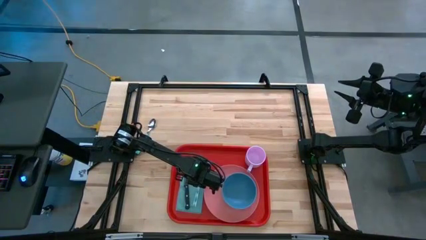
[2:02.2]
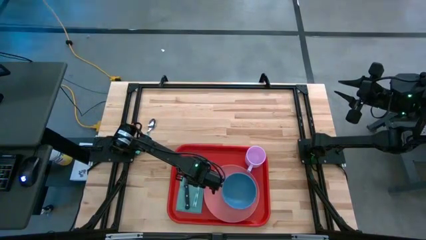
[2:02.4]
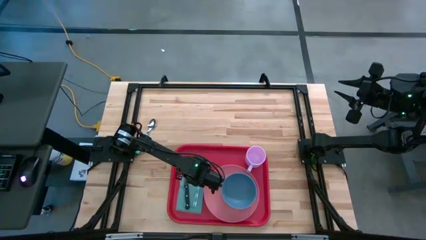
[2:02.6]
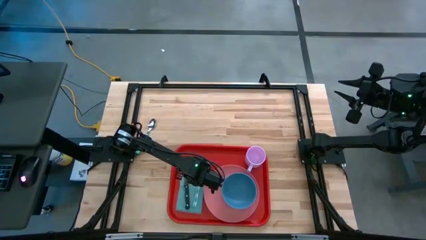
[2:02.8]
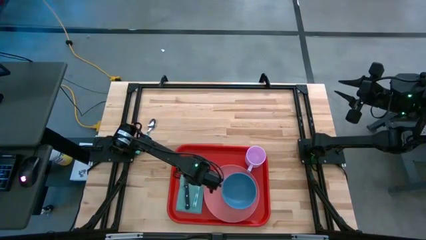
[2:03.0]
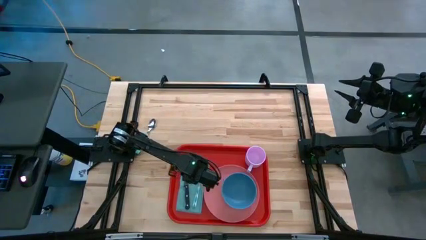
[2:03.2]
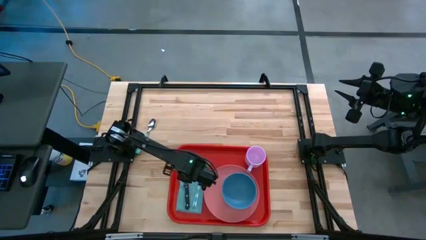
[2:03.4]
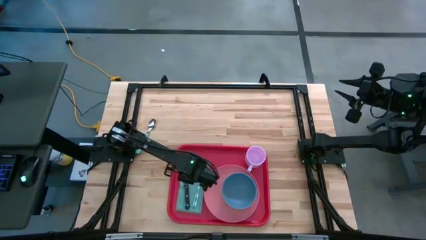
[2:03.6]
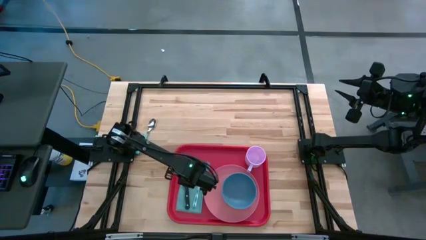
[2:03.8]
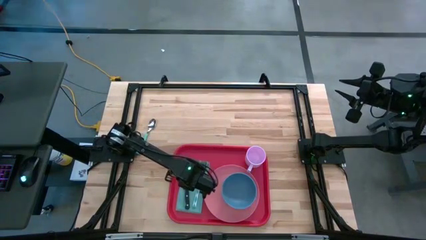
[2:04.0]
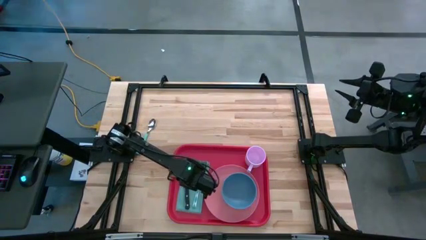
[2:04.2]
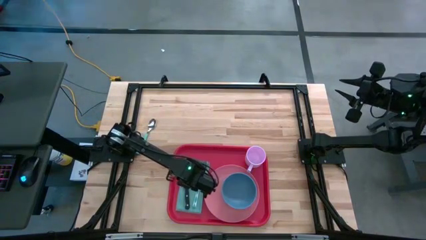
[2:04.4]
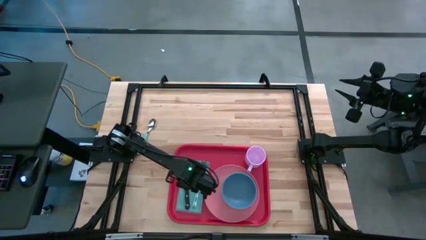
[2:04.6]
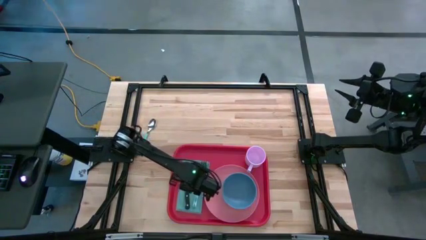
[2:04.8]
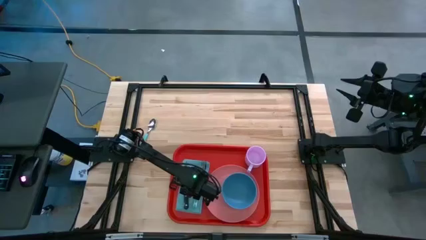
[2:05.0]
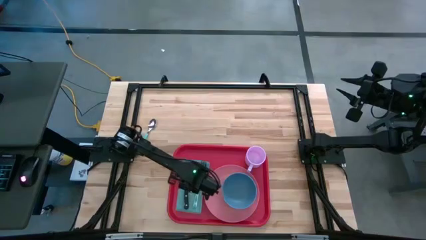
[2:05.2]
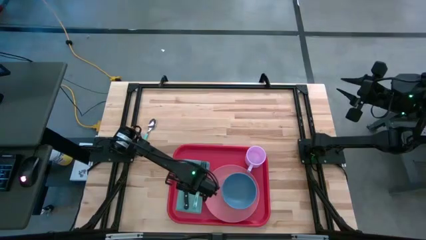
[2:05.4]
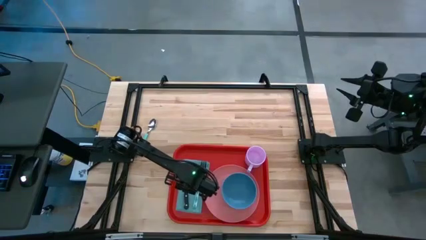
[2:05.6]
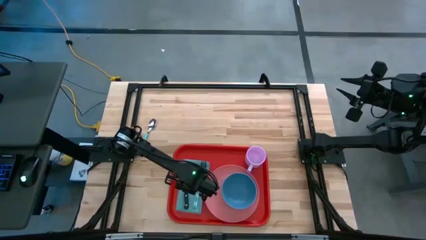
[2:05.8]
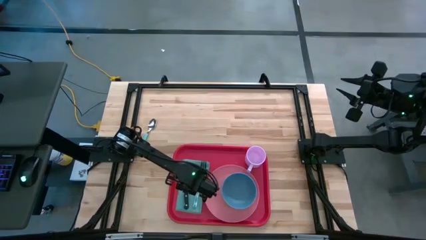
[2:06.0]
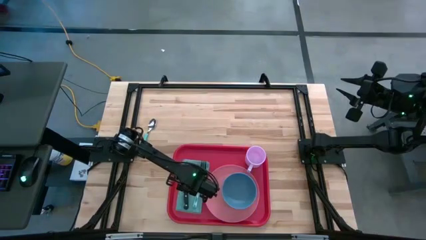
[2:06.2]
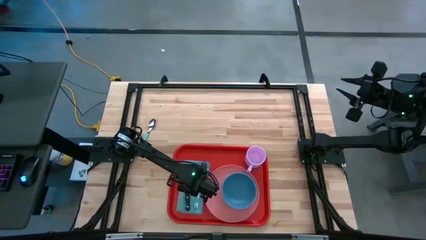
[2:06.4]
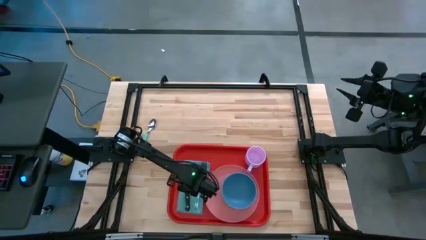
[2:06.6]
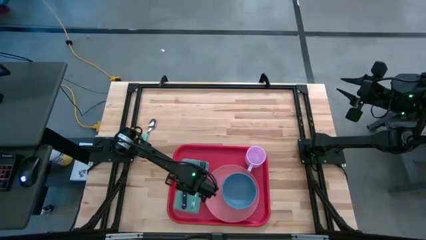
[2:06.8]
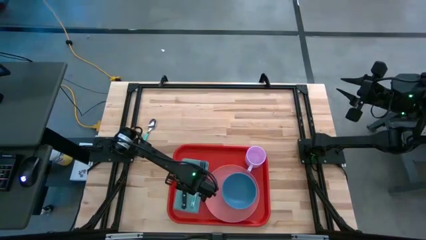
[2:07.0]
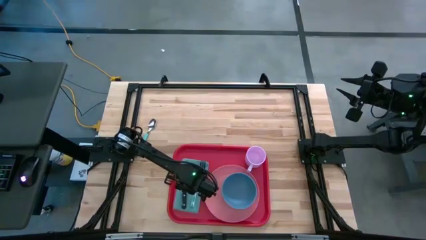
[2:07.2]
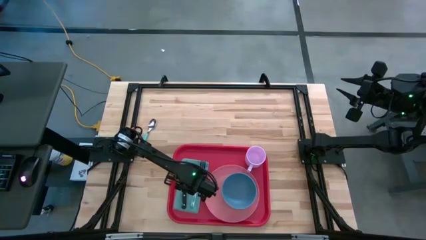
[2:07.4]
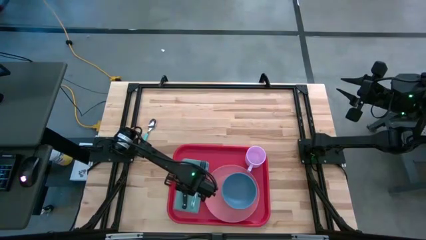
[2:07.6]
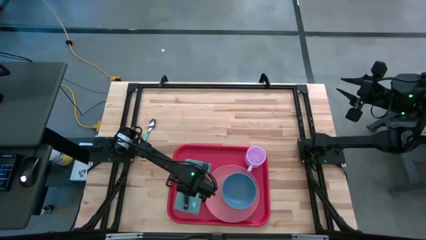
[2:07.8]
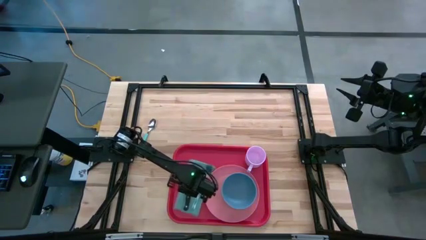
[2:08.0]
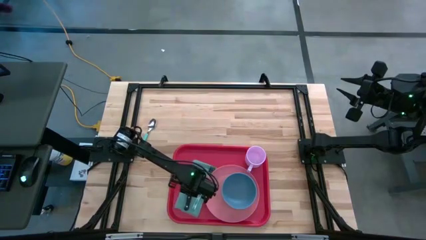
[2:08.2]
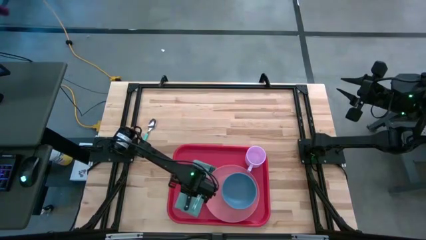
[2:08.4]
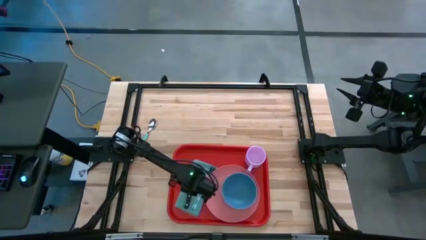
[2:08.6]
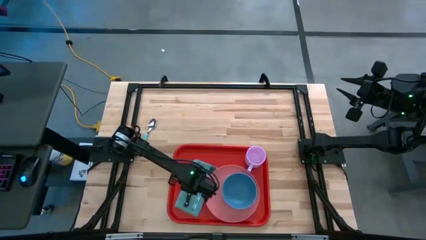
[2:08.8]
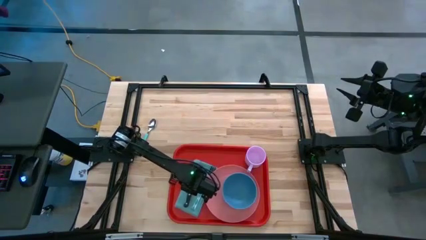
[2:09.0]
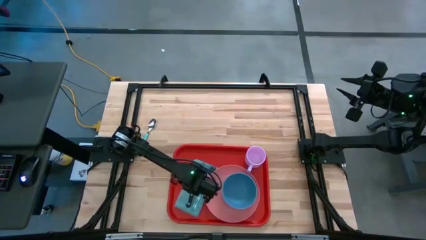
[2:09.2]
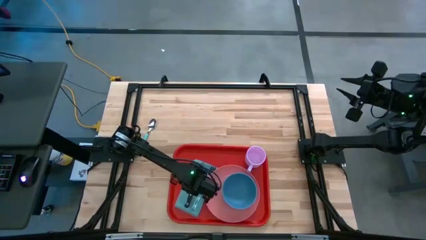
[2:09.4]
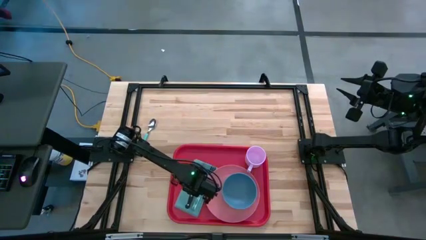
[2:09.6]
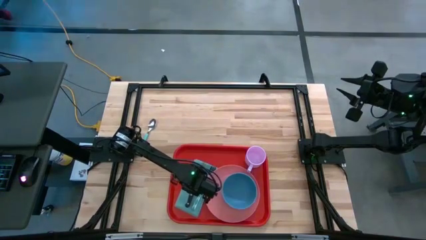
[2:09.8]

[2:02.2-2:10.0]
Task: Set up tray
Adjust the black knife

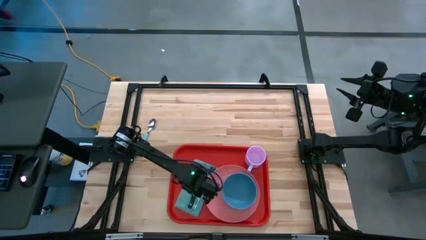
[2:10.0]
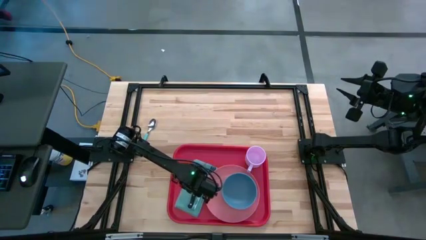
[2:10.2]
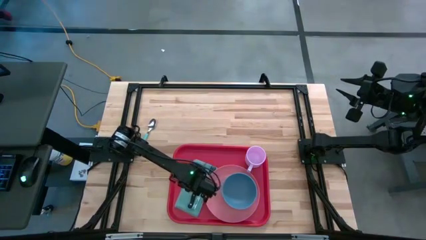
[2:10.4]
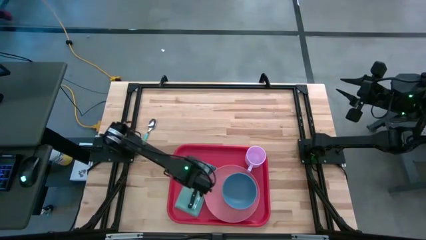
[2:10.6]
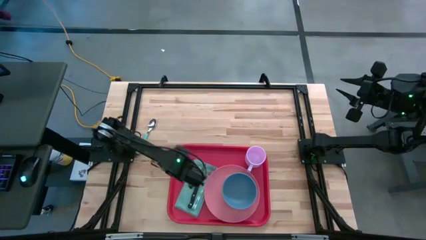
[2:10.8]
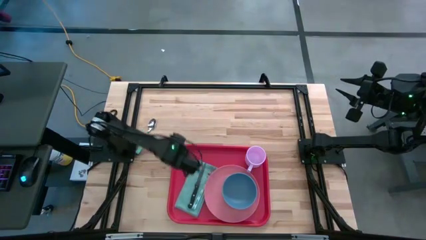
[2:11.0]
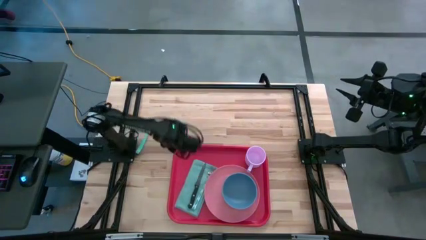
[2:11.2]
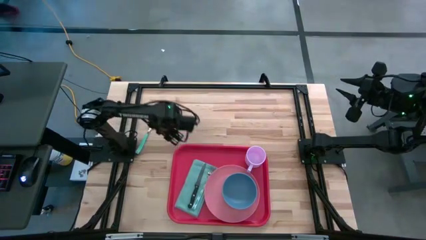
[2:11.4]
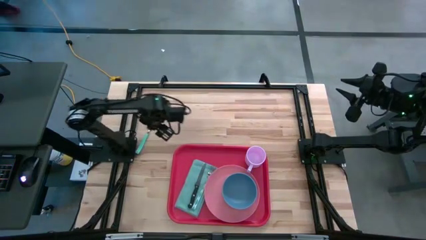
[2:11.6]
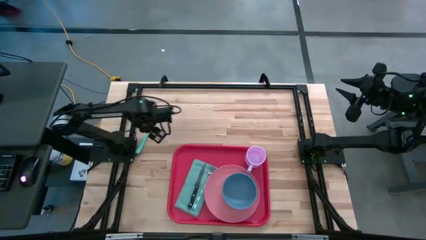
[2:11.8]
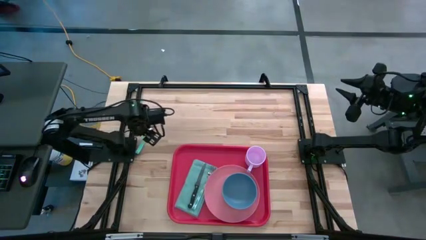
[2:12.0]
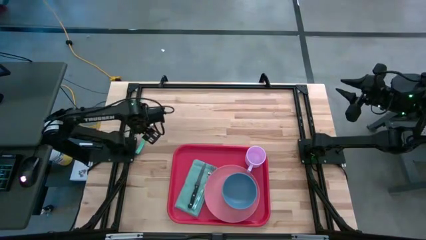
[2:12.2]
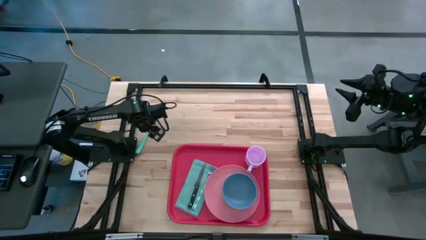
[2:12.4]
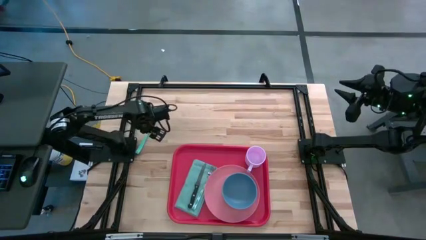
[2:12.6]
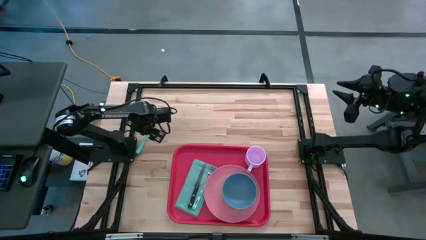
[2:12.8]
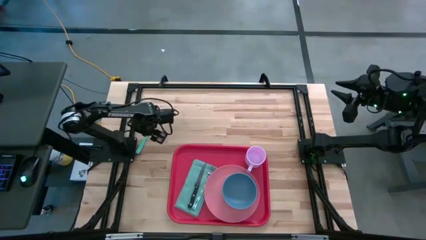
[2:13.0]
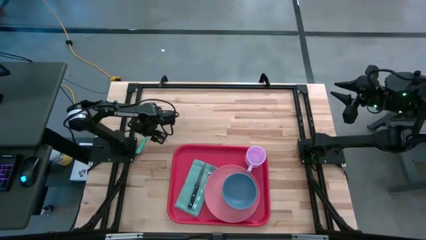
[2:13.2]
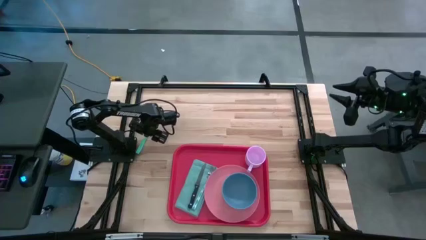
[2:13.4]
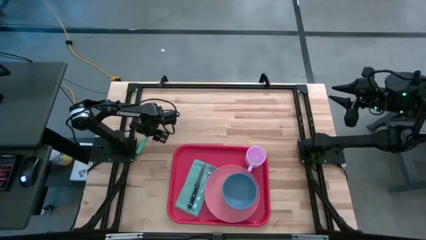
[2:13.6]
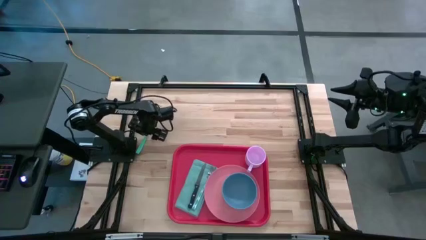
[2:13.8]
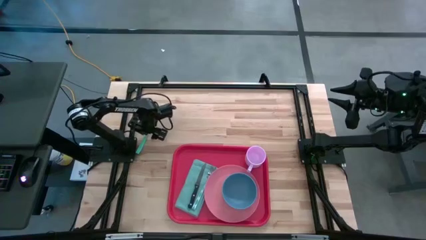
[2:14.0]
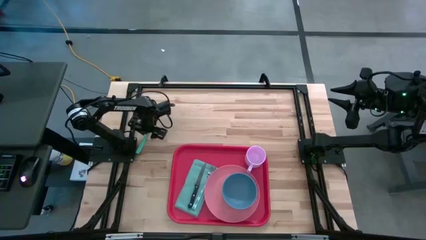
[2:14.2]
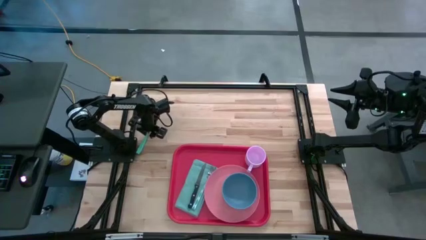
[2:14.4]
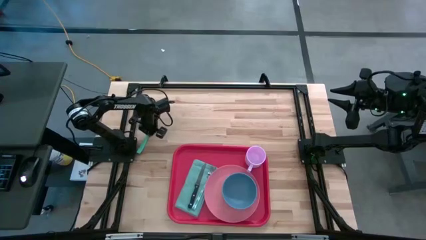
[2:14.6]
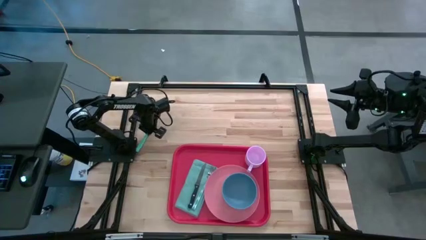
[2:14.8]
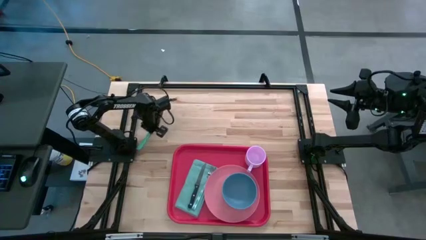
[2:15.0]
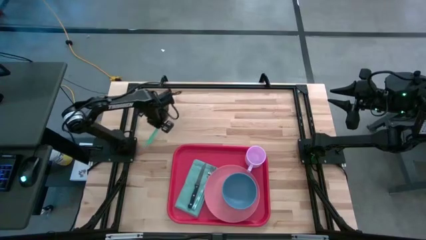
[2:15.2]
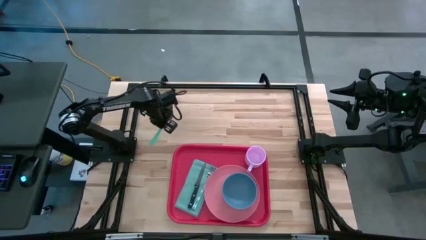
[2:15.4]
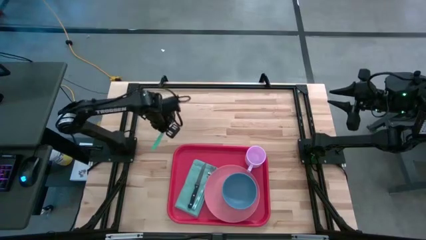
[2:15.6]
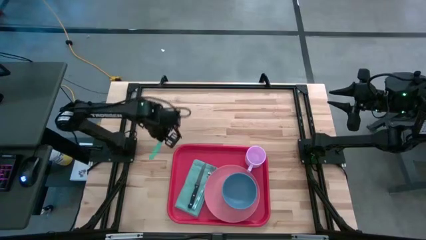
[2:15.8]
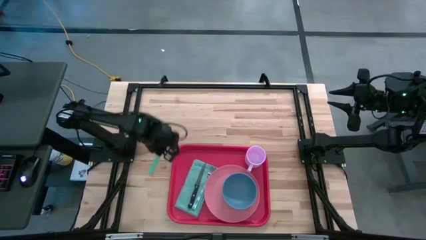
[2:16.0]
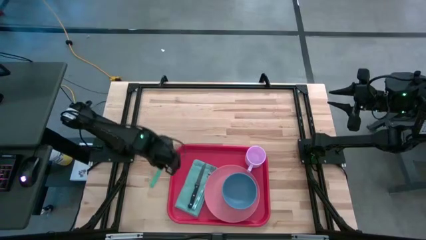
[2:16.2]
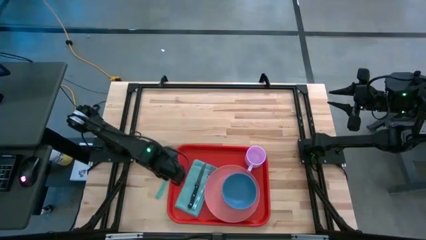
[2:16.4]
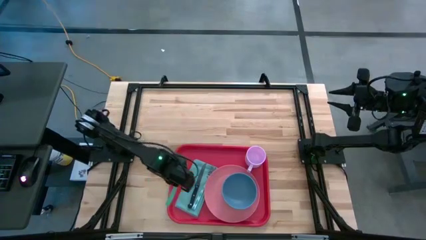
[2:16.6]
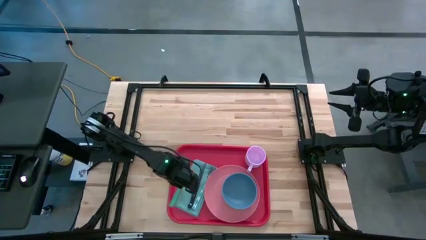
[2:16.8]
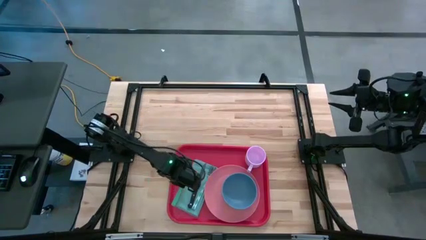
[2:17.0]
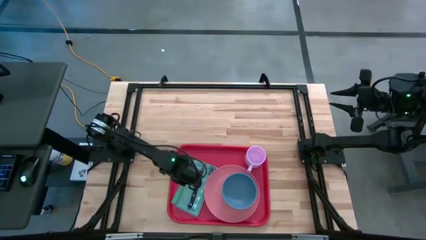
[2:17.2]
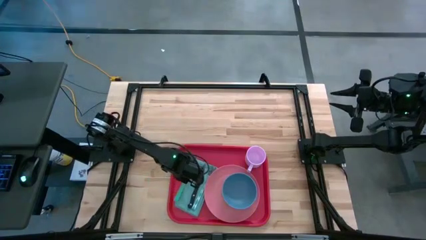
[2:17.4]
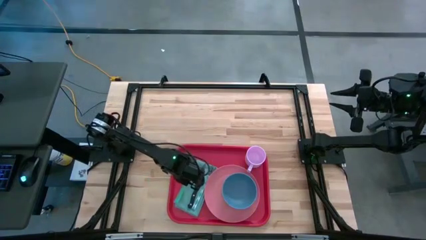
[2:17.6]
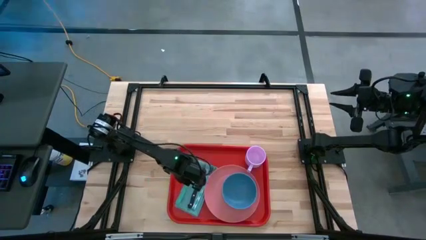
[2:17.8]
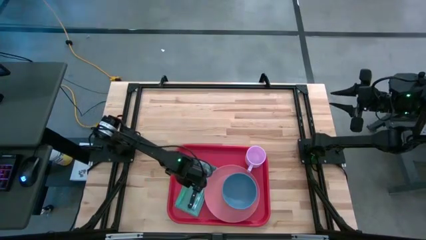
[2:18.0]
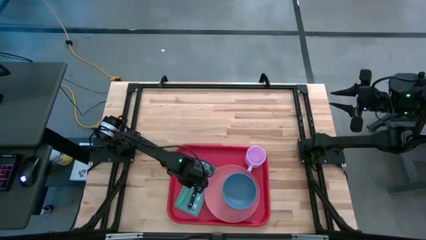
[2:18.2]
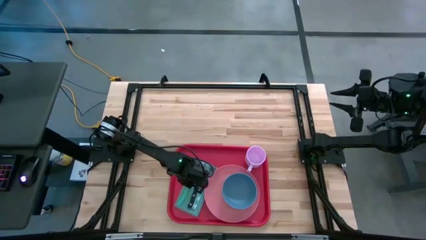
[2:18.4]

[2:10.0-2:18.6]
Put the blue spoon on top of the blue napkin to the left of the knife

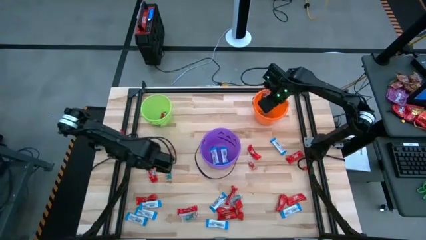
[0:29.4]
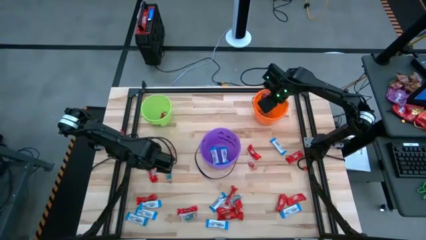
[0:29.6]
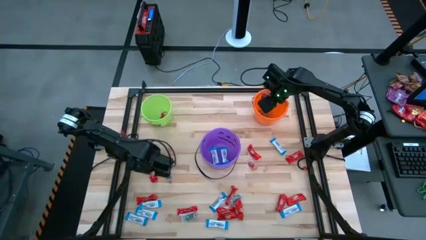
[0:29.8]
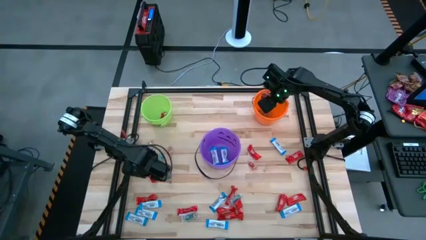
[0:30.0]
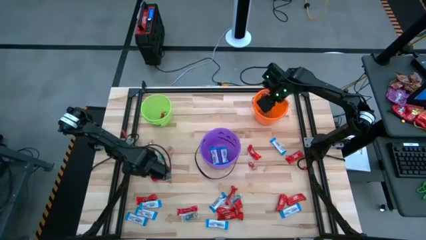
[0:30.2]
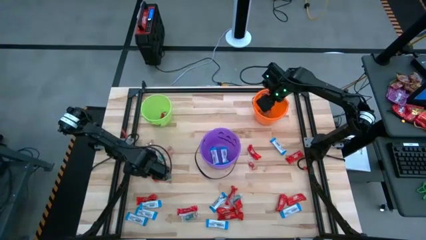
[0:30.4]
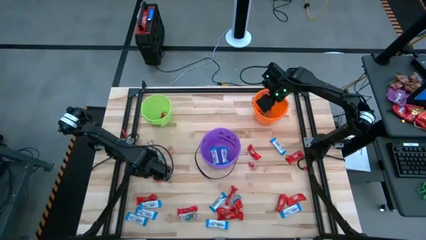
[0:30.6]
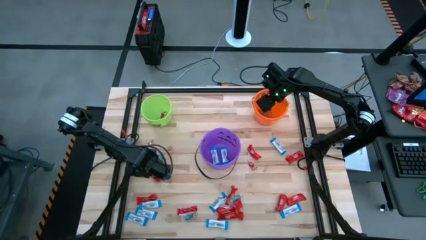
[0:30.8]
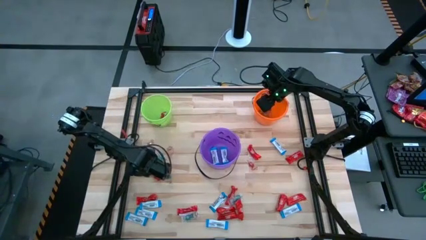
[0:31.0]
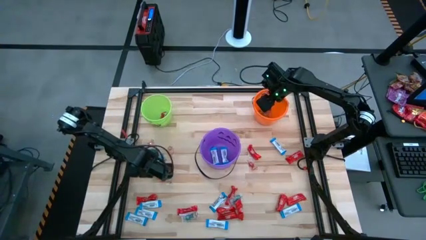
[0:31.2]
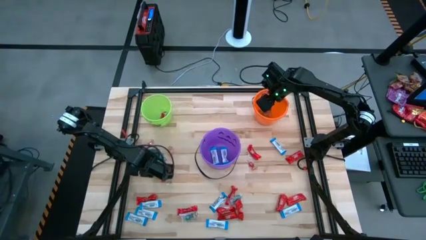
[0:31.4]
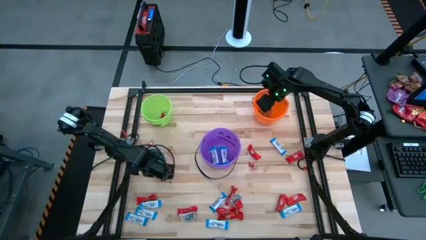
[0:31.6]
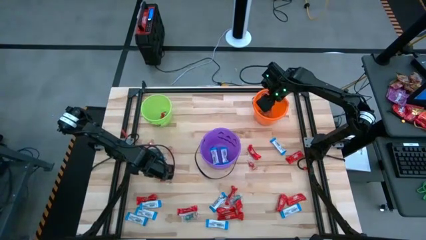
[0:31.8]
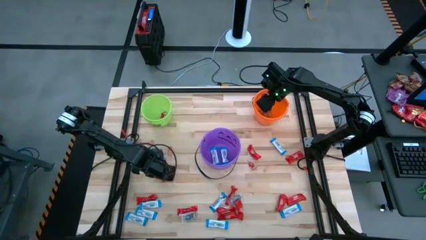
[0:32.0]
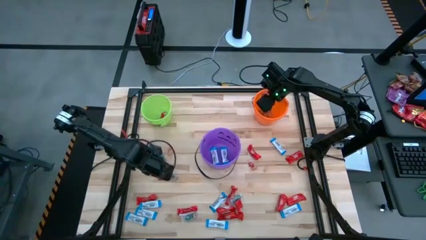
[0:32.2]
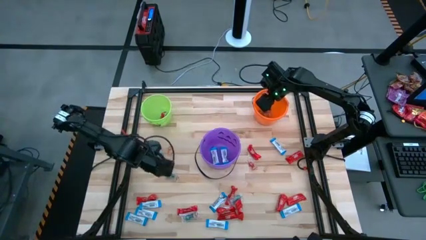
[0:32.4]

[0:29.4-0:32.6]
Task: Sort candy by brand, put in halloween buckets
Put the red chocolate into the green bucket
